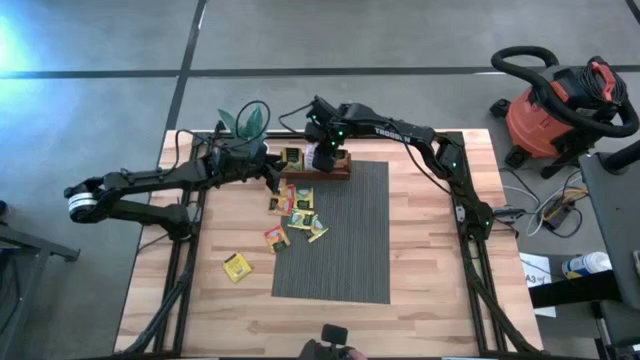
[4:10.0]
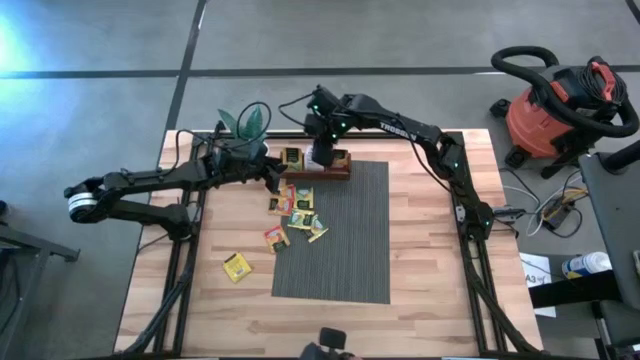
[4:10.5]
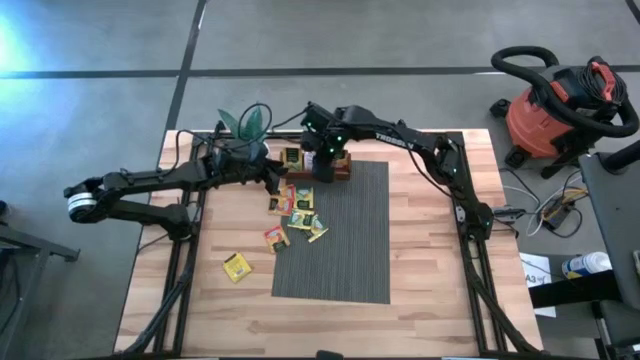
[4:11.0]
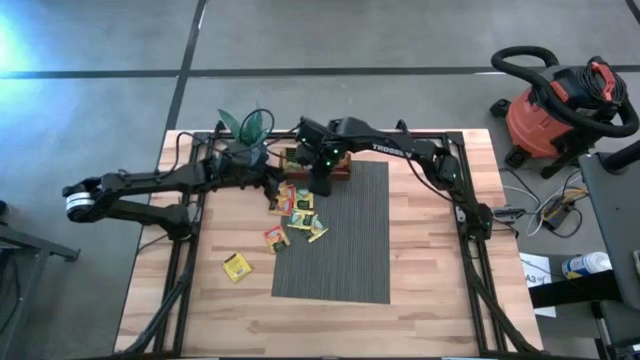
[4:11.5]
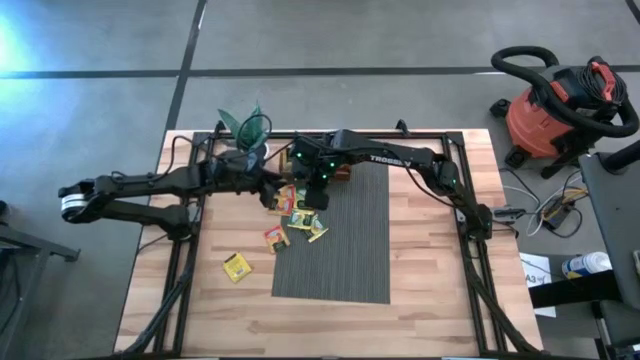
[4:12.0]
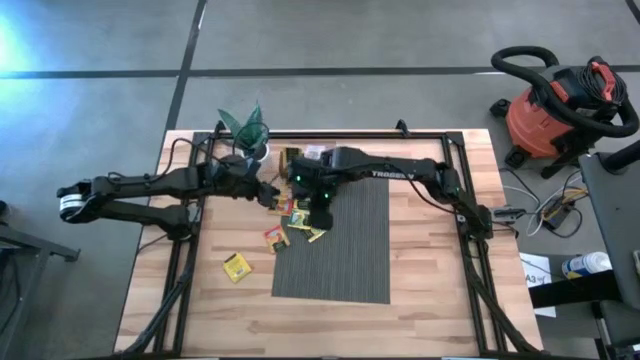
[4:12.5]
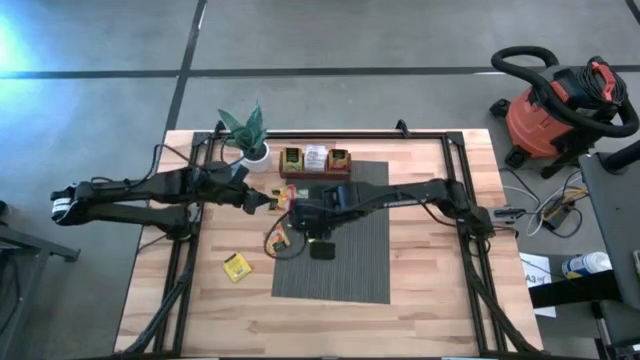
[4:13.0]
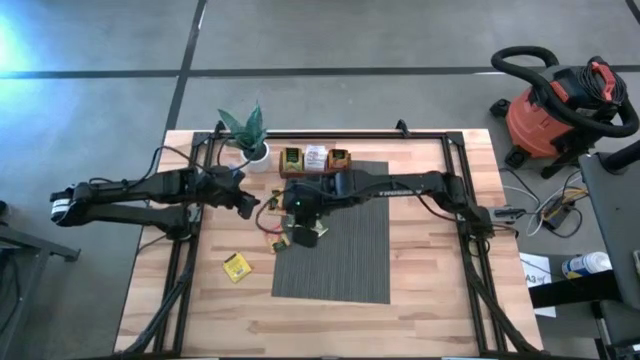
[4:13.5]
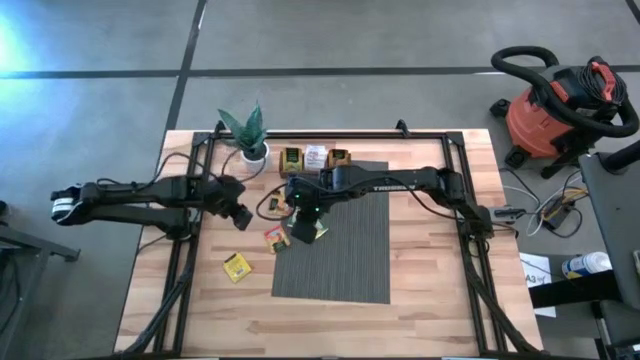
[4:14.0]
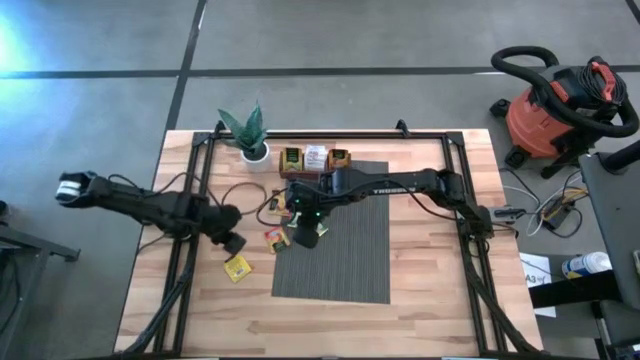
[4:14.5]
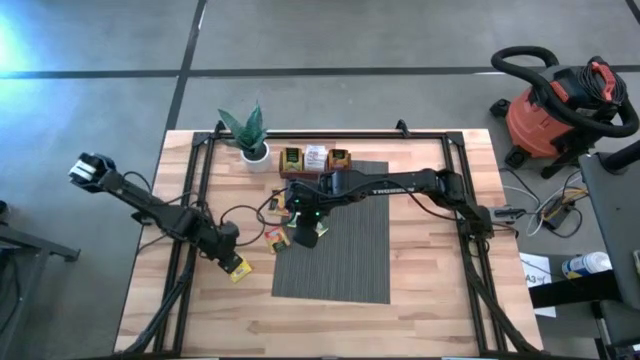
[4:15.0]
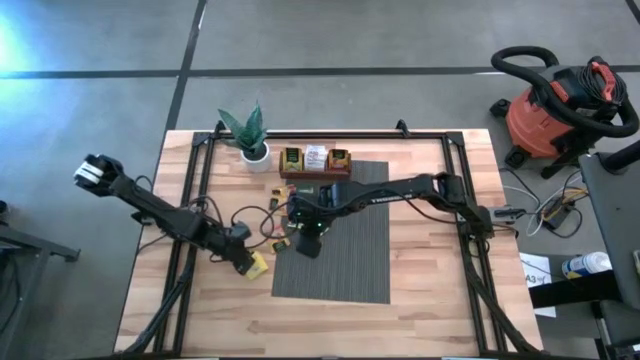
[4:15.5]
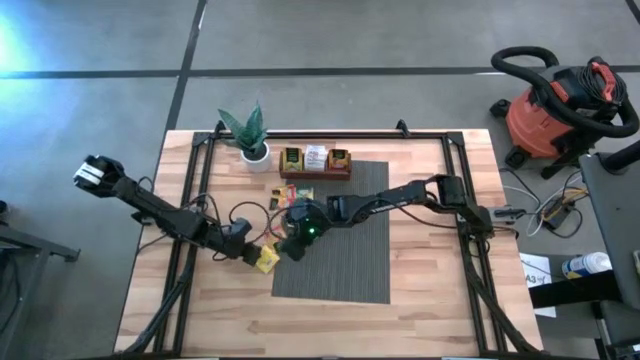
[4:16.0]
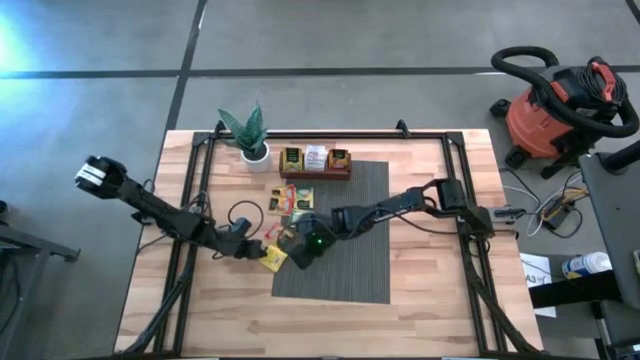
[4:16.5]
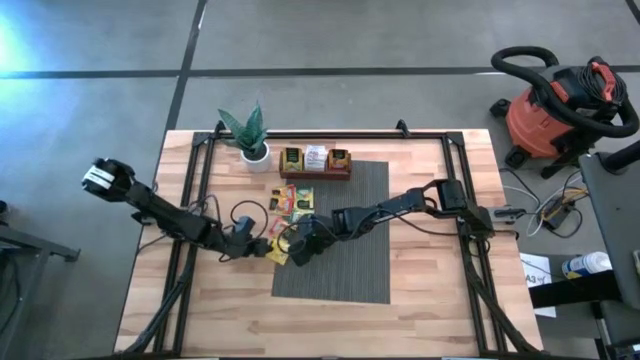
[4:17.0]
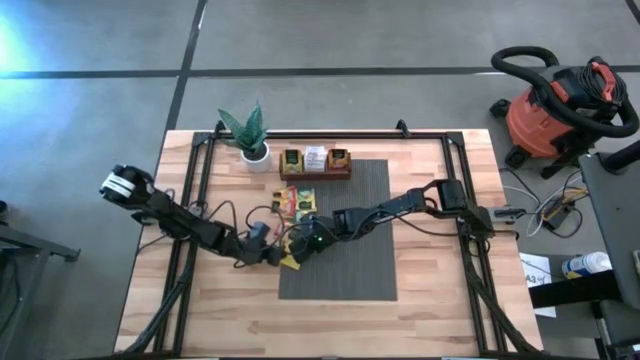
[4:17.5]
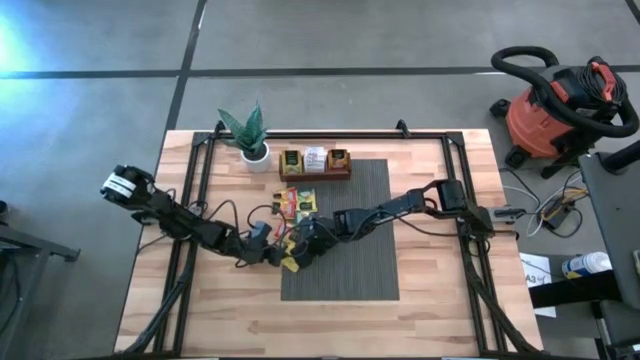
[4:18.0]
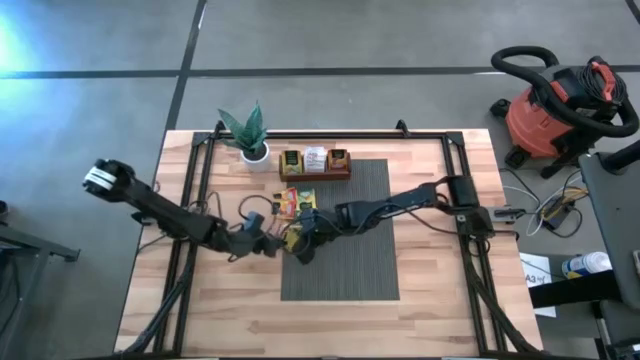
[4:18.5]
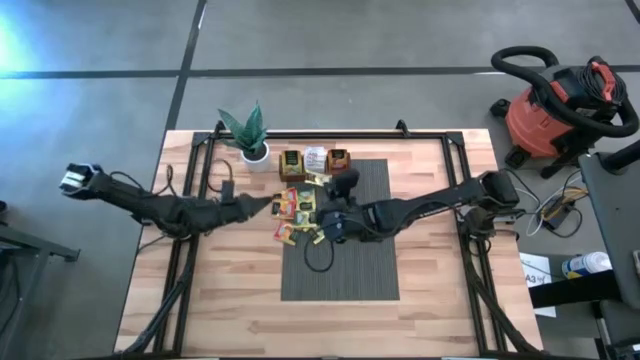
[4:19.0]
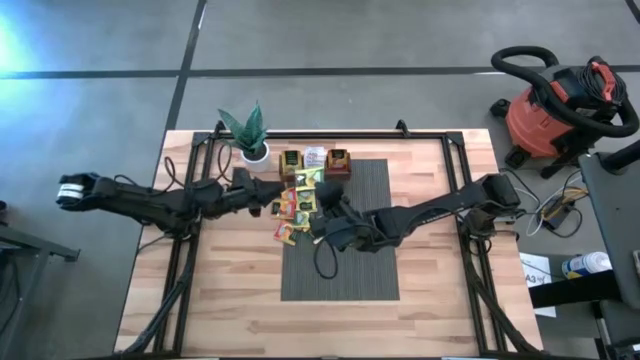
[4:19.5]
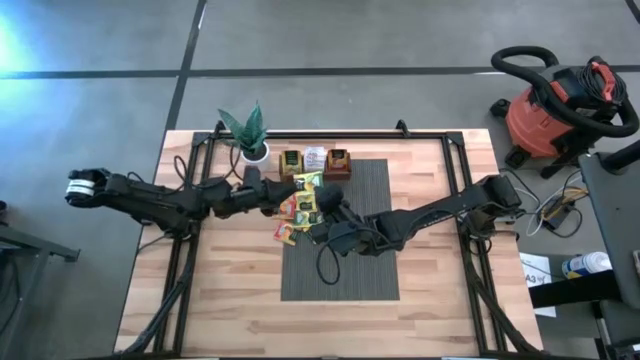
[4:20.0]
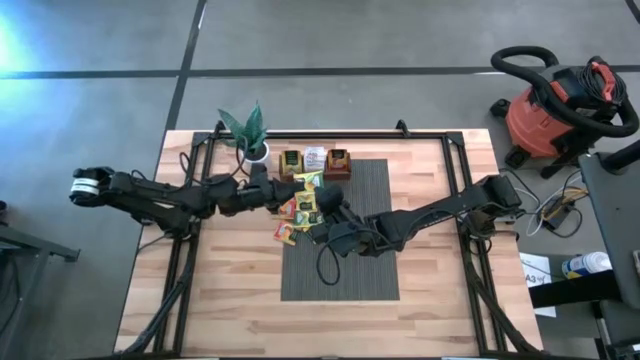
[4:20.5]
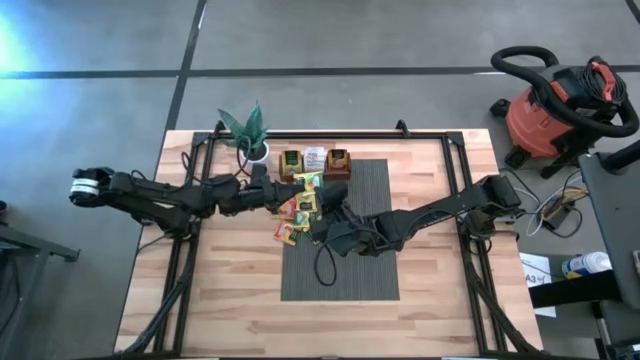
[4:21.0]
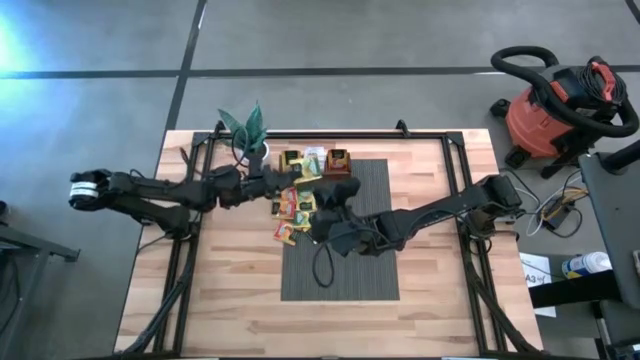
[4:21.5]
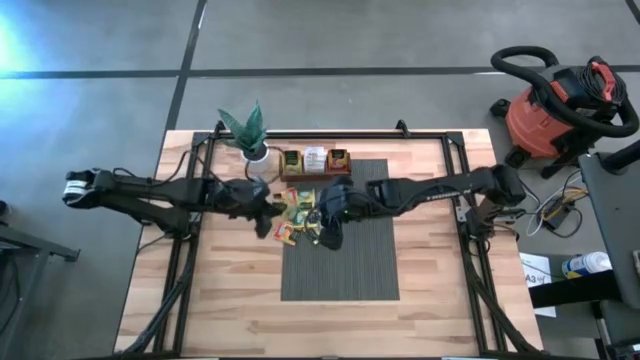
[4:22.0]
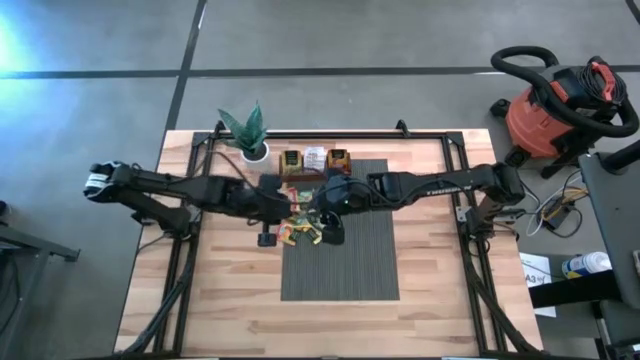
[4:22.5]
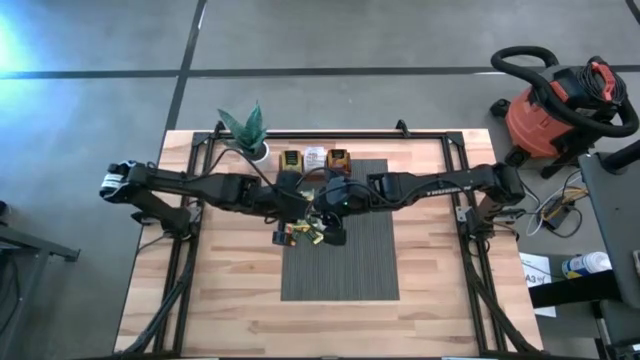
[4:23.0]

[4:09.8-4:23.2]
Task: Pick & Place Tea
Put the yellow tea bag into the left compartment of the wooden organizer

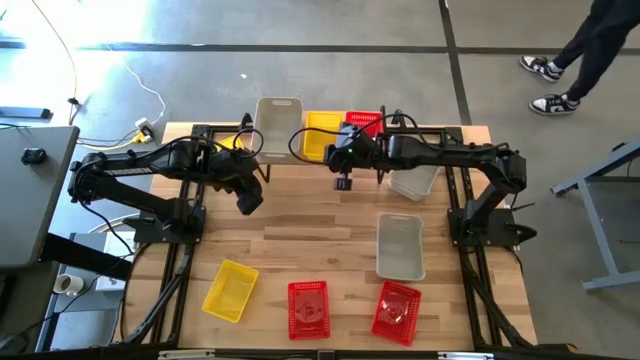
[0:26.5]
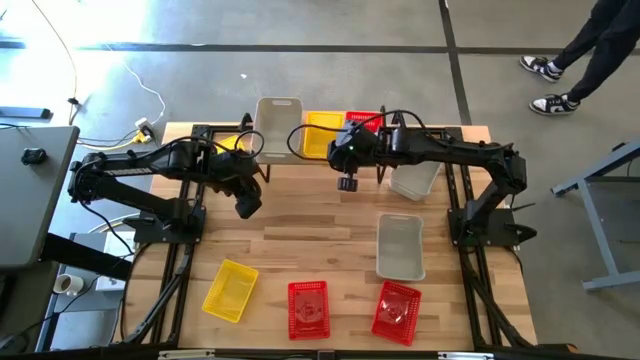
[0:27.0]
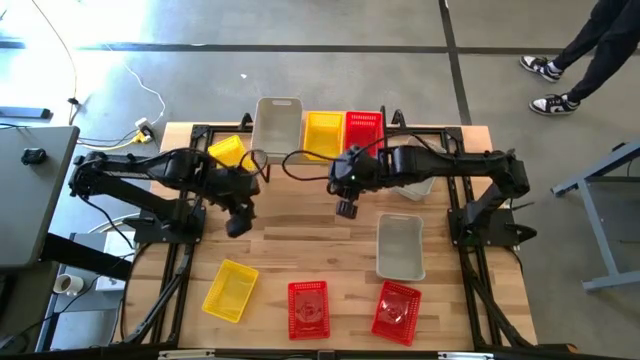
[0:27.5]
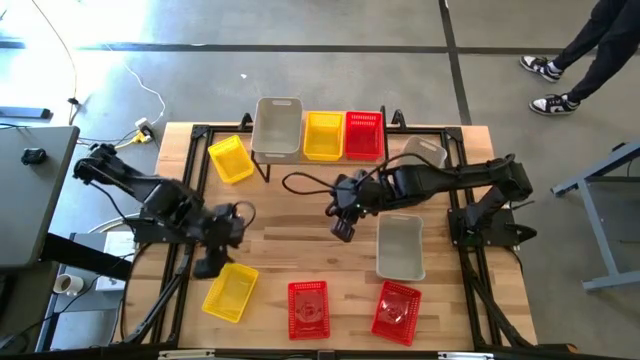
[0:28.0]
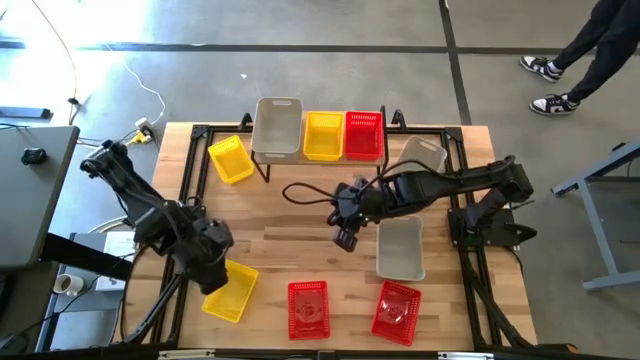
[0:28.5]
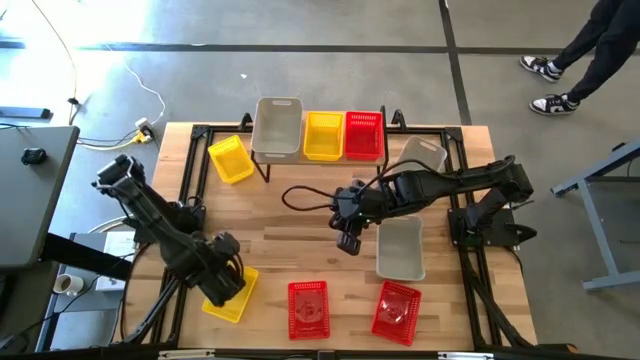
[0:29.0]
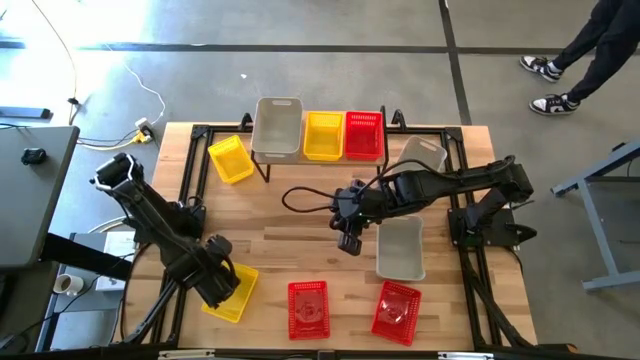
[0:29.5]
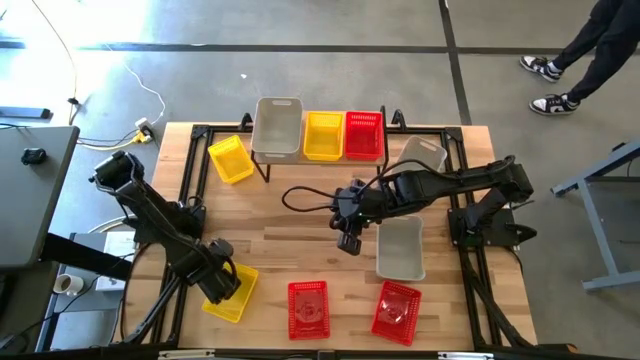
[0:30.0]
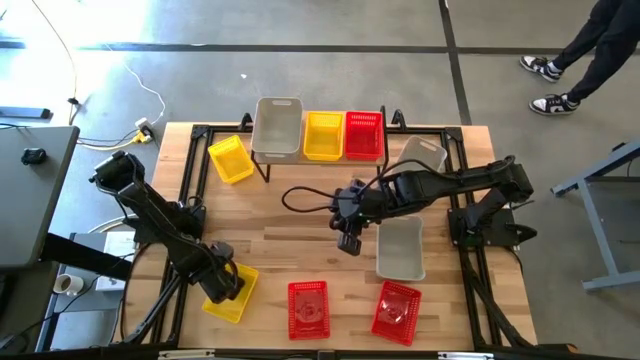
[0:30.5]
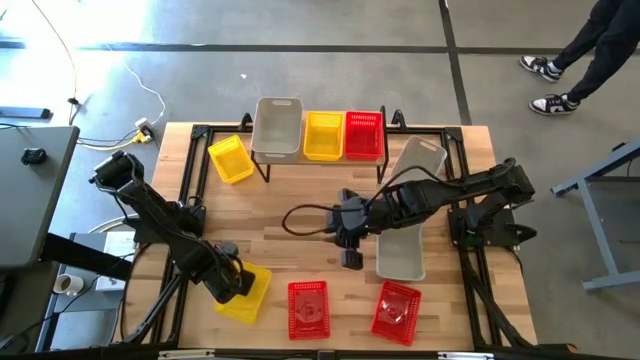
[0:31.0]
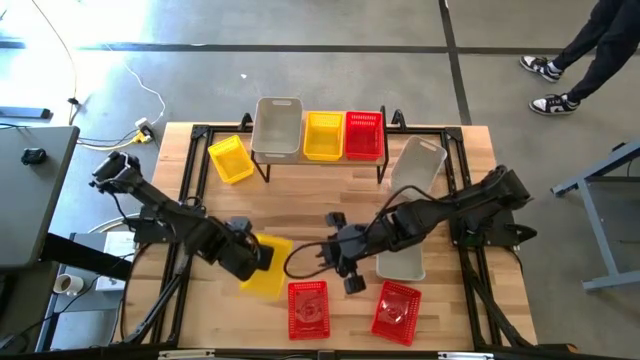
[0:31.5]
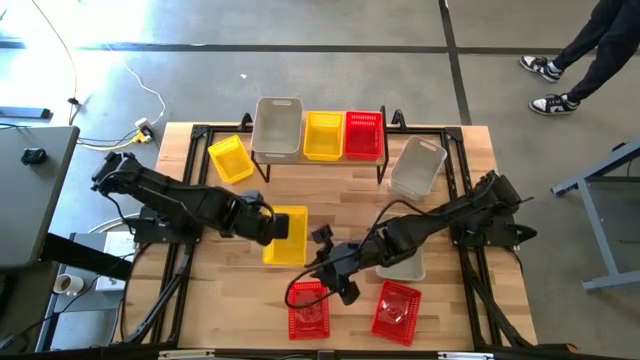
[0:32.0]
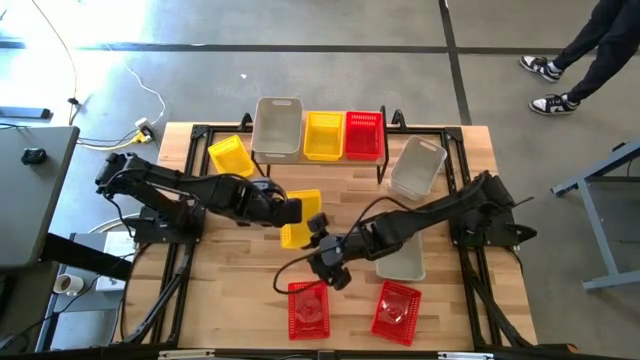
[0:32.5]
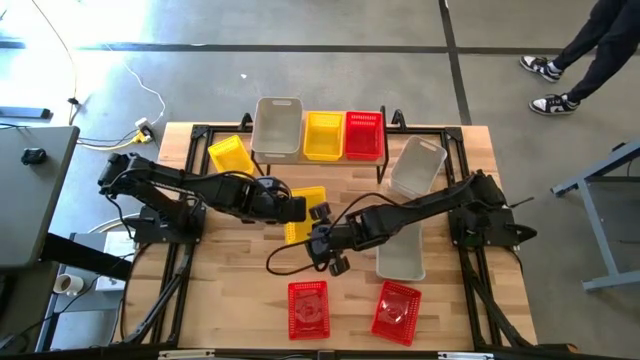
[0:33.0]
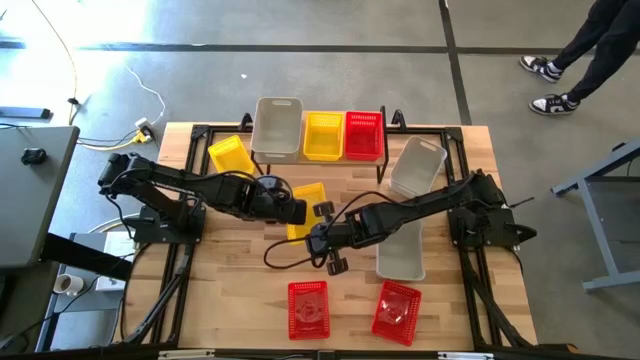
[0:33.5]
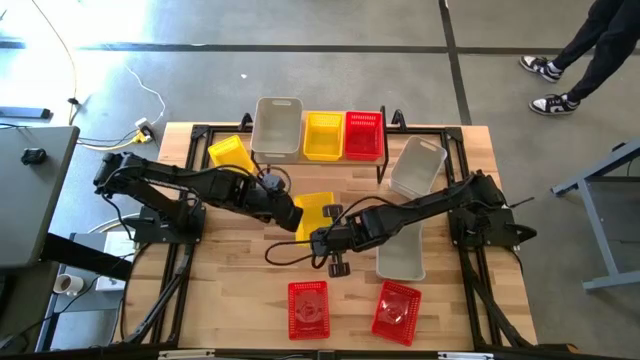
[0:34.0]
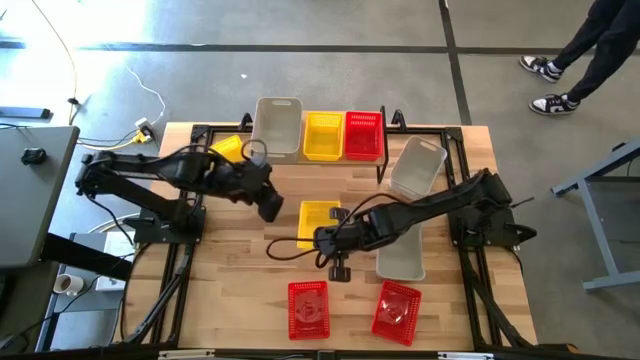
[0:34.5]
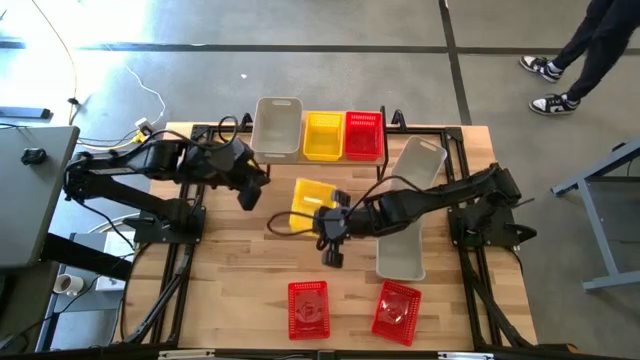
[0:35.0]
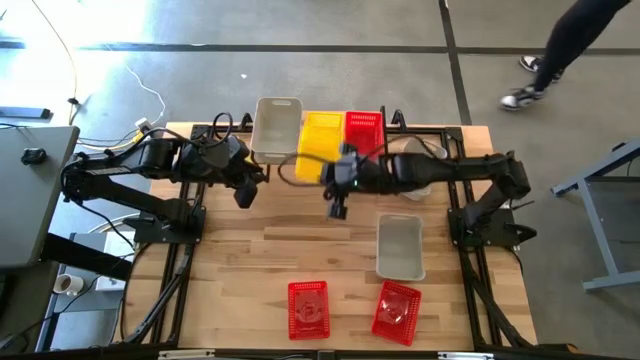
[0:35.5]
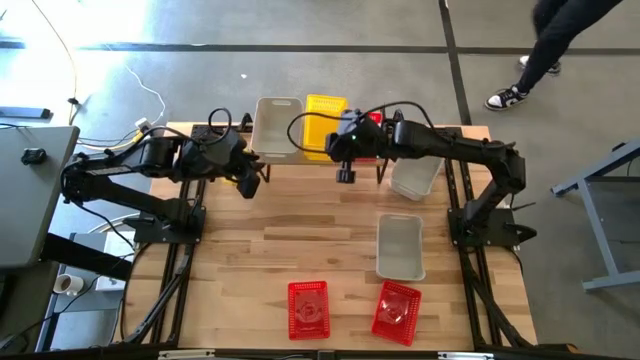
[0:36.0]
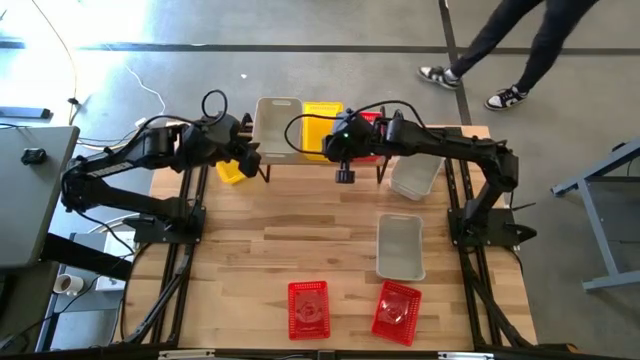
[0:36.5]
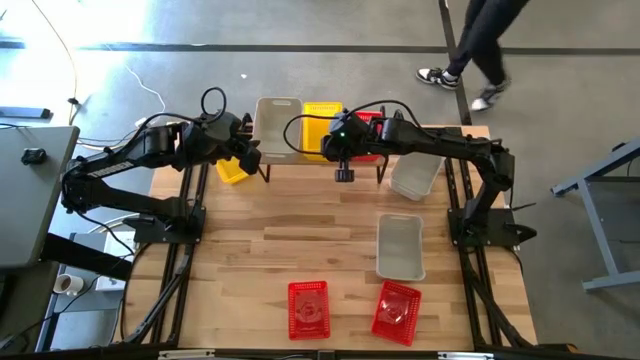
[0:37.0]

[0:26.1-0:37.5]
Task: Stack baskets on shelf by color
Stack the bottom yellow bin on top of the other yellow bin on the shelf
